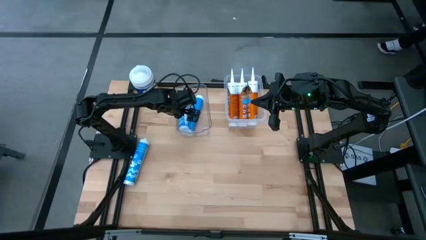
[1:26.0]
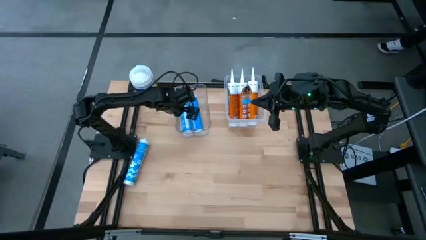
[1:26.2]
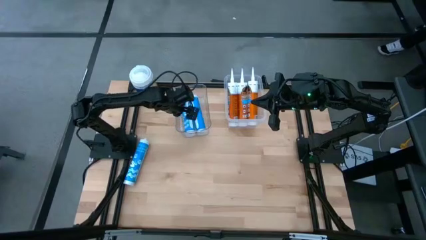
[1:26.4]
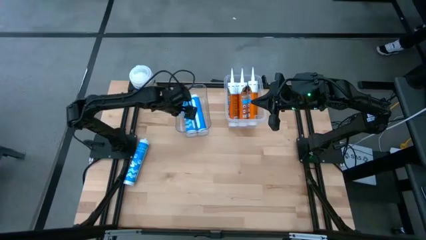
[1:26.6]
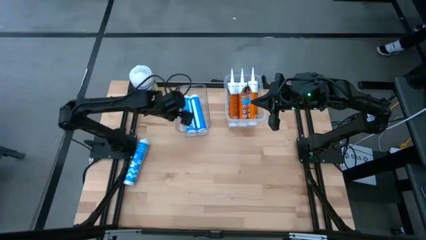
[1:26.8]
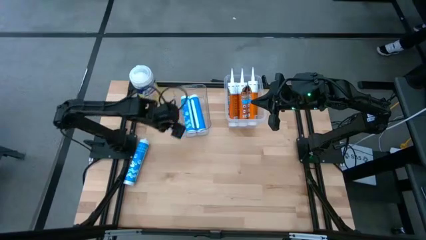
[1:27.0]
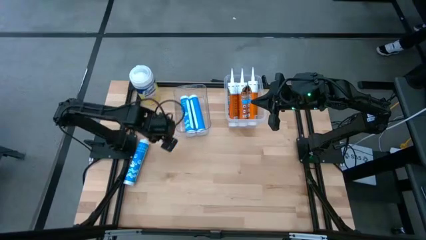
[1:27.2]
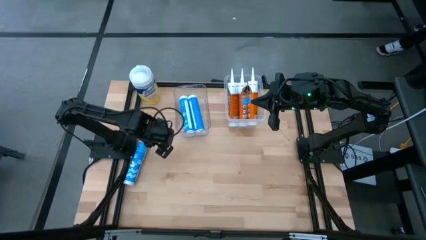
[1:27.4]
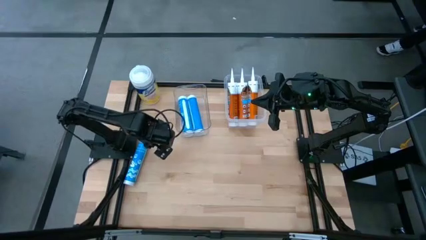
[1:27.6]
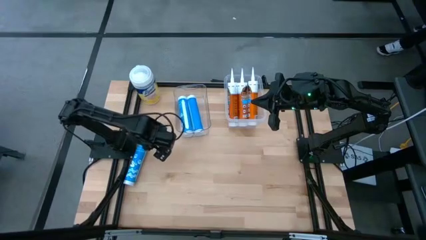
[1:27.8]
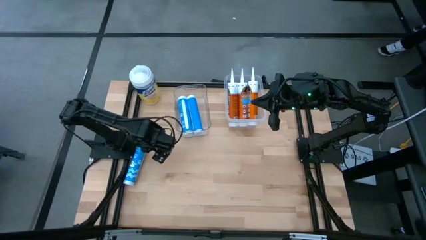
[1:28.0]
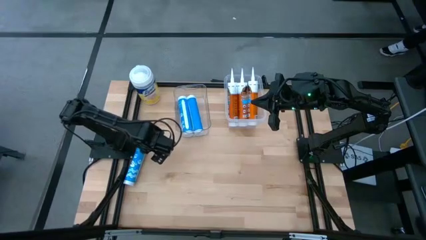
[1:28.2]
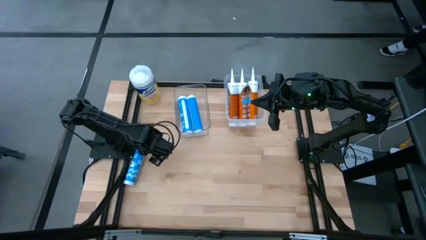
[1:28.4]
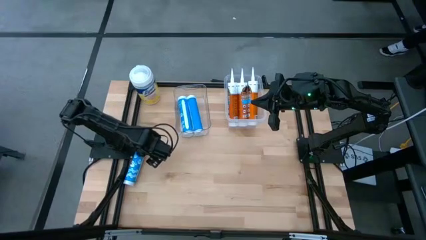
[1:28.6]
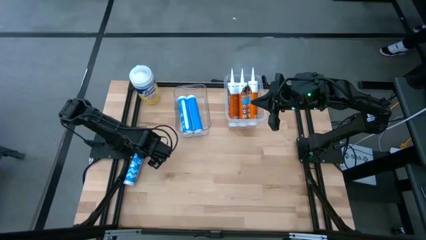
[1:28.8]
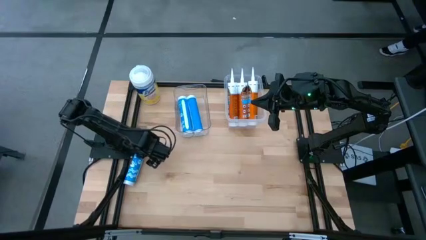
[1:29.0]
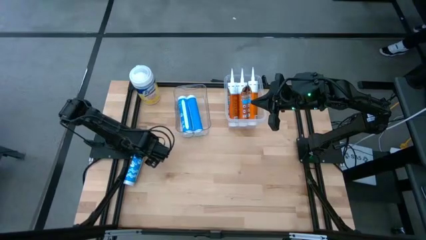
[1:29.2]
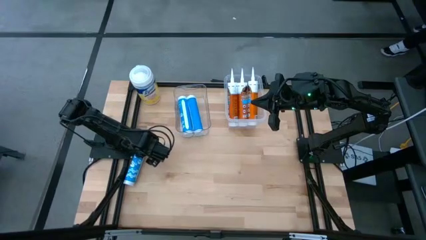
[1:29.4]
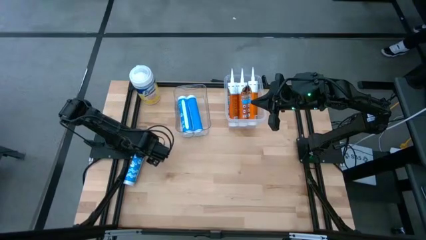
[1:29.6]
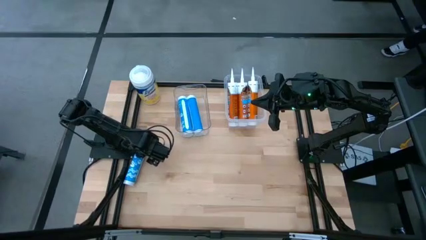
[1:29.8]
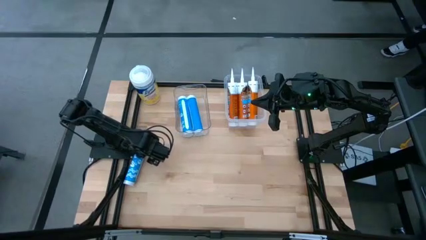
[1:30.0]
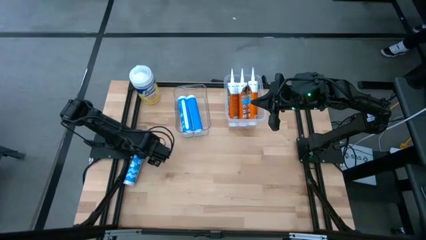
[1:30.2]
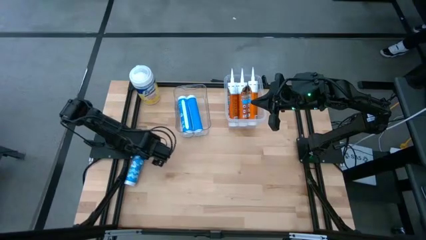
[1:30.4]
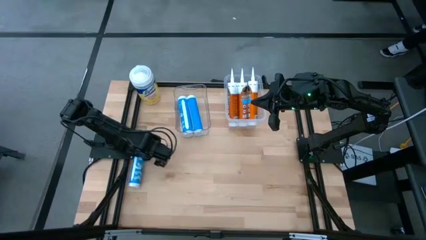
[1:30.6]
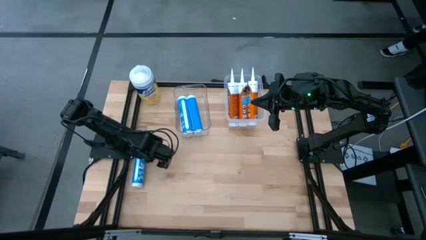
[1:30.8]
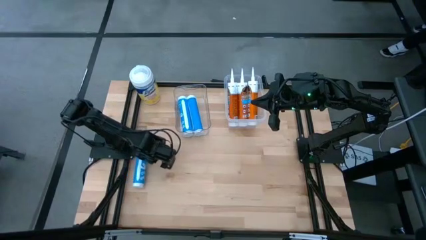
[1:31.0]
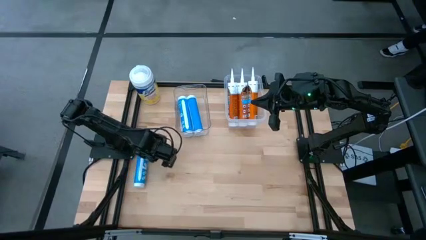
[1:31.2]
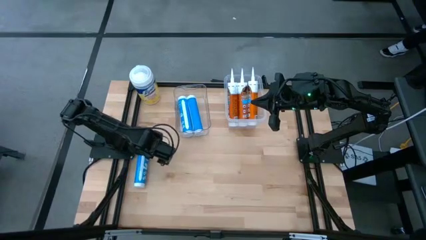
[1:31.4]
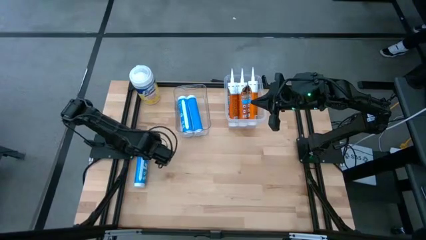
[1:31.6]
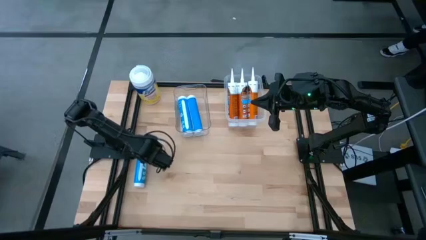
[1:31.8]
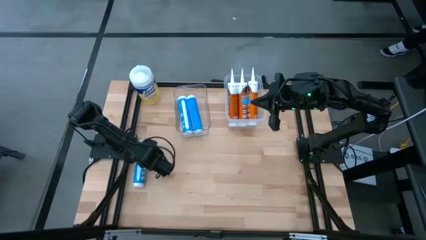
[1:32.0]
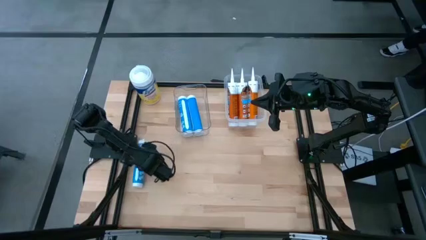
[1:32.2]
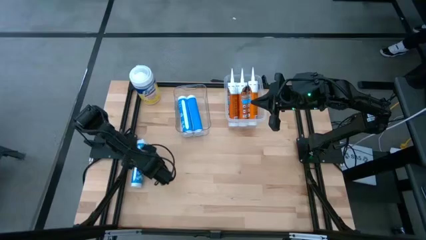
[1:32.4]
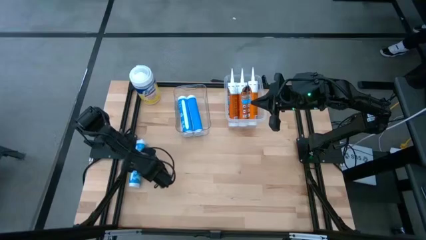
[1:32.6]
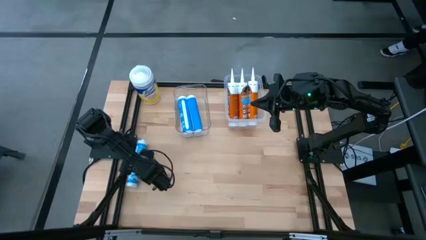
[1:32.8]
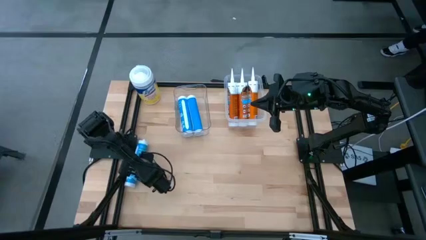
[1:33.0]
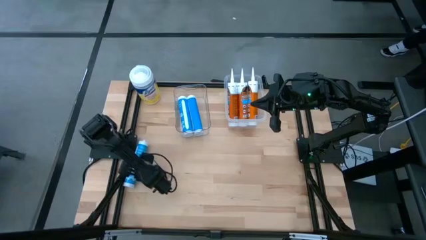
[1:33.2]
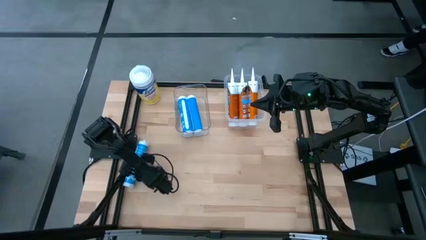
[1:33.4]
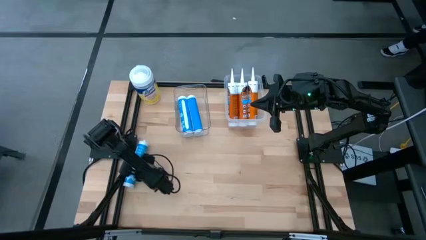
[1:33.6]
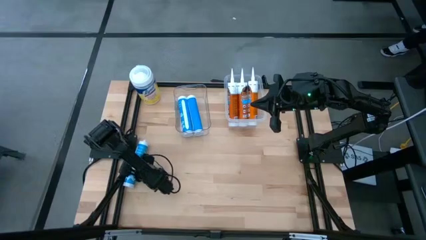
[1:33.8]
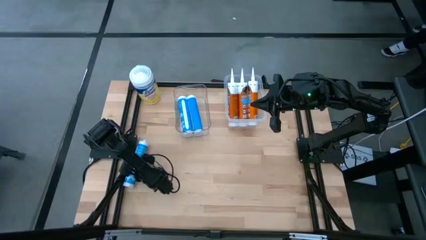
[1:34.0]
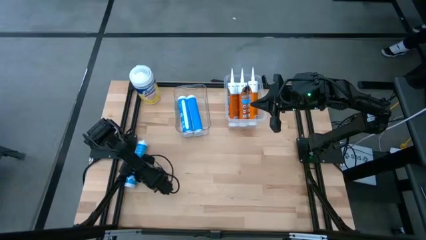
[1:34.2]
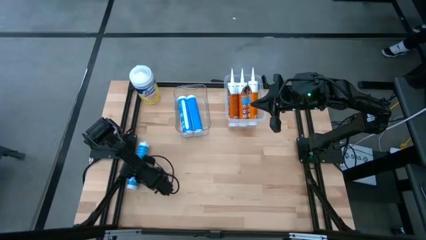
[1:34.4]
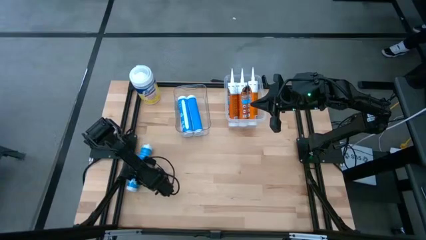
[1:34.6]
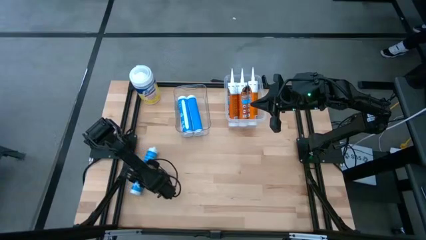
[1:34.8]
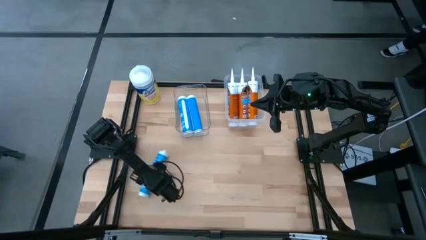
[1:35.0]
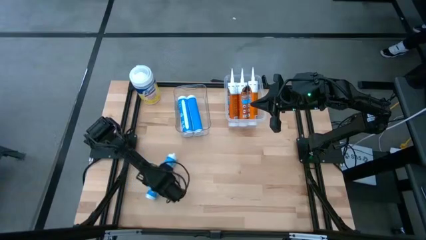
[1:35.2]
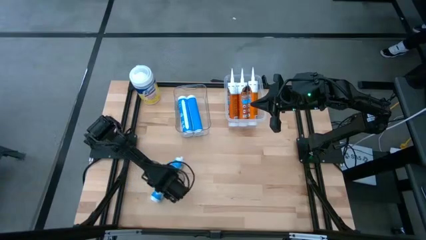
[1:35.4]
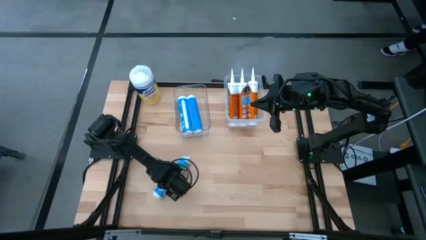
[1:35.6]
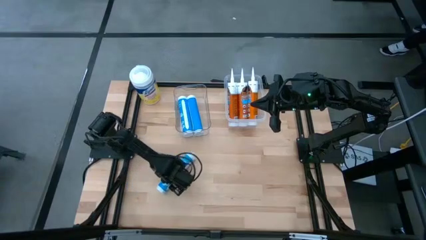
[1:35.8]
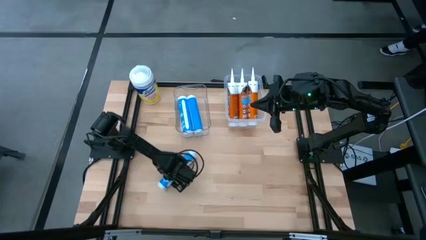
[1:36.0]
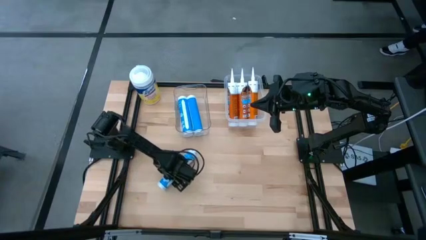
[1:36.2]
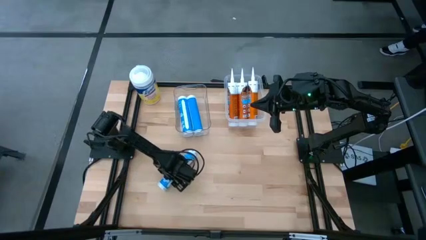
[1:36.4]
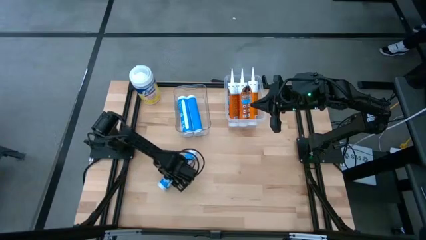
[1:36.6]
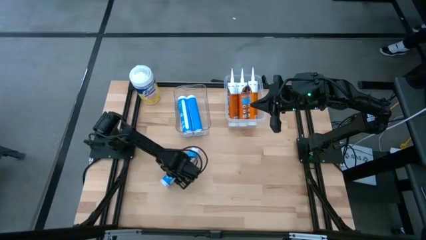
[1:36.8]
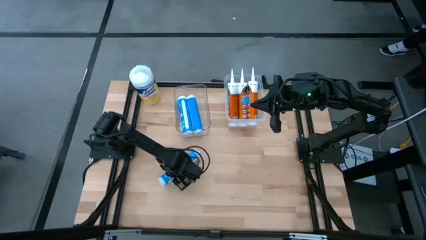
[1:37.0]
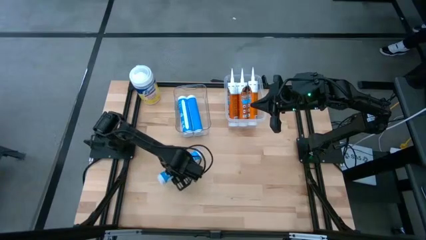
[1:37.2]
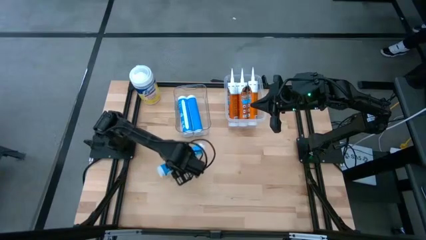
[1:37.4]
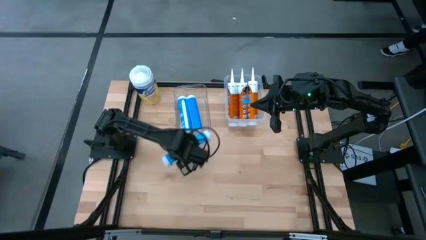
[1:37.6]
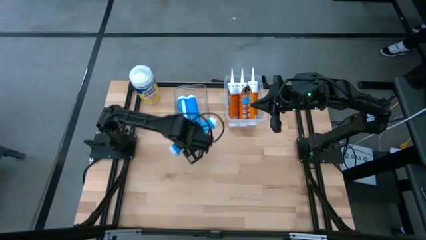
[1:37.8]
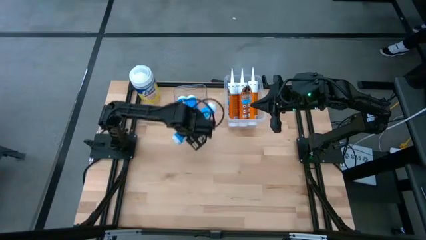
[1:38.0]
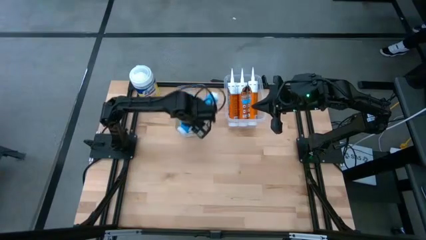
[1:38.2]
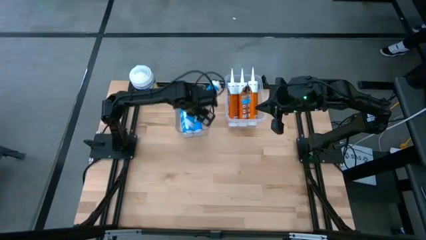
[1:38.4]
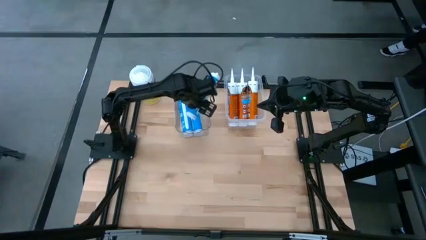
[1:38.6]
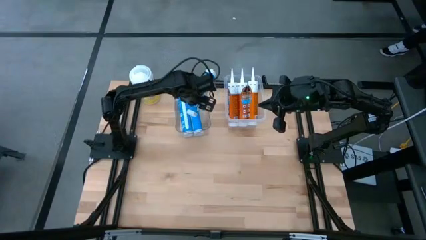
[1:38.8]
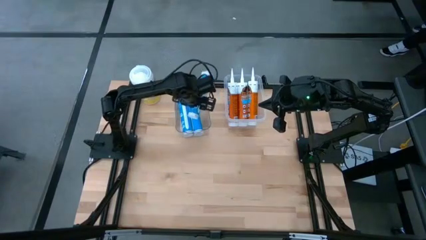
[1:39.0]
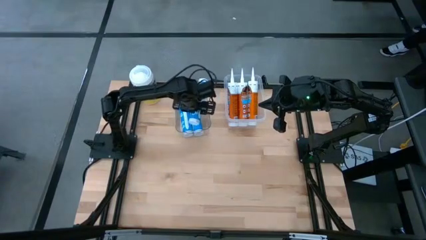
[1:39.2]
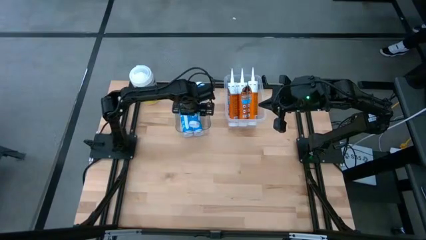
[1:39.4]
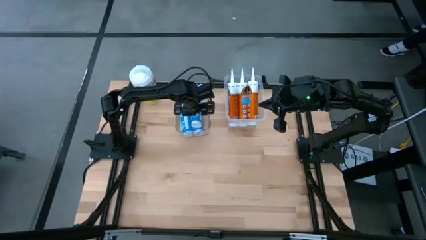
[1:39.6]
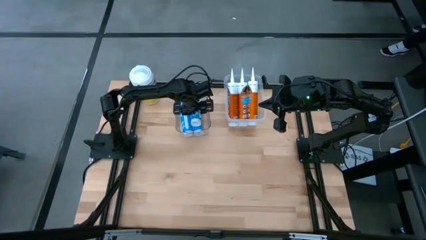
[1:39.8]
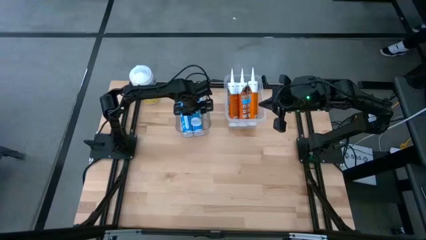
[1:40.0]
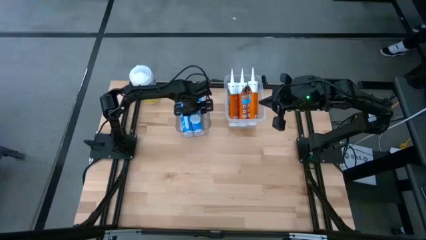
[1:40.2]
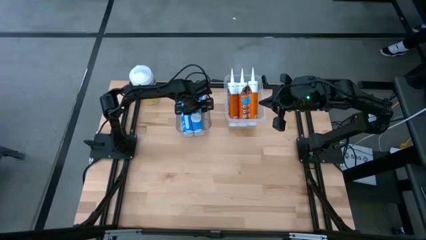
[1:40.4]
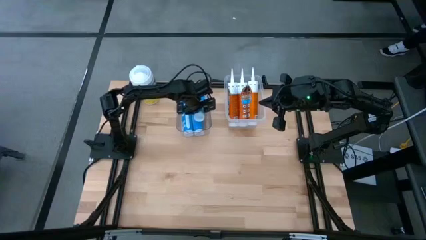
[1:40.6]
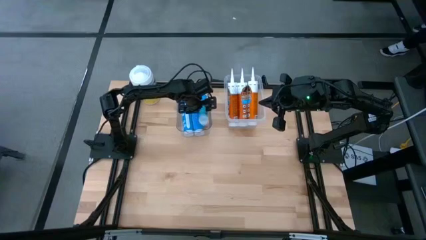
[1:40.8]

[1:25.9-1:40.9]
Task: Pick & place silicon tubes, Sealant and Lysol wipes
Put the blue sealant into the left transparent bin

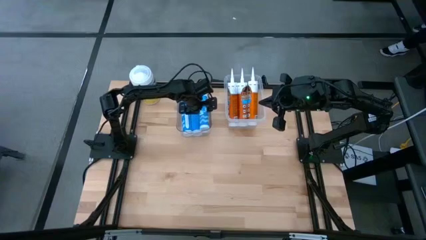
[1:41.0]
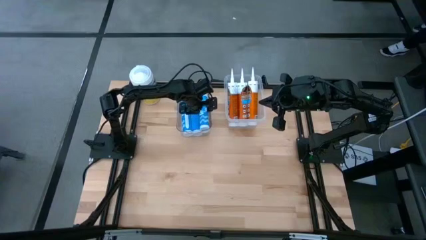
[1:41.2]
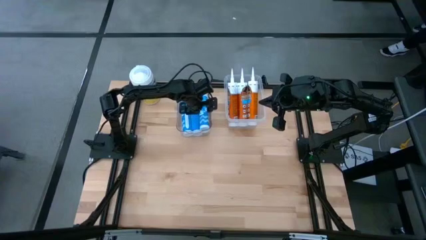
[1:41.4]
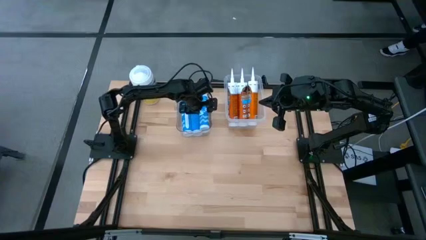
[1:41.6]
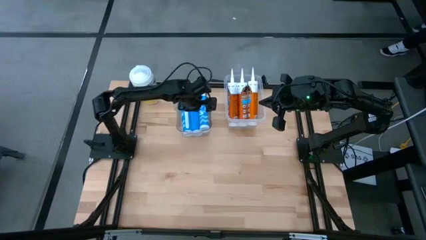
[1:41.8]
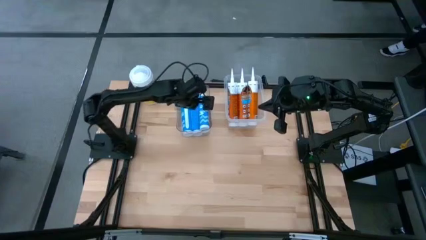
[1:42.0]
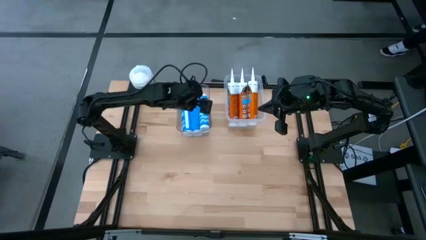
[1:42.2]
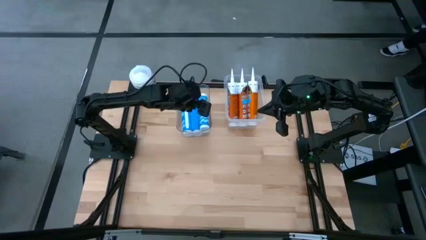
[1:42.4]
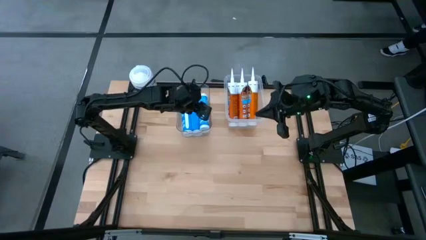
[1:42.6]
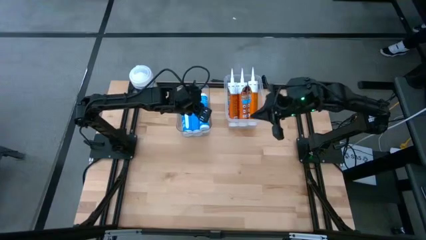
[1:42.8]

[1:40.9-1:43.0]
Return to Home Position
